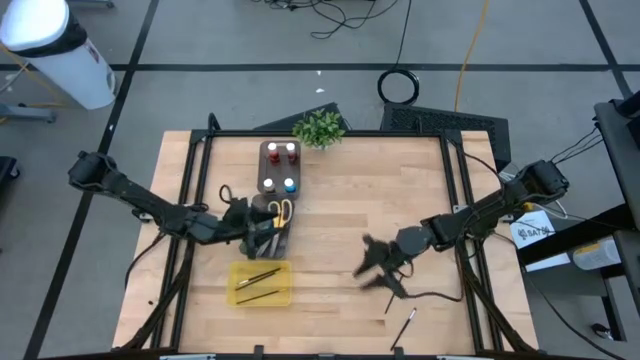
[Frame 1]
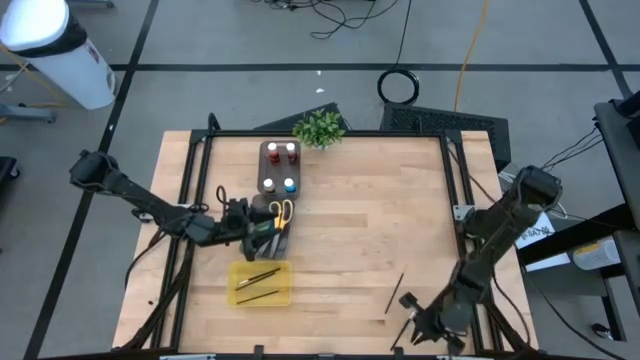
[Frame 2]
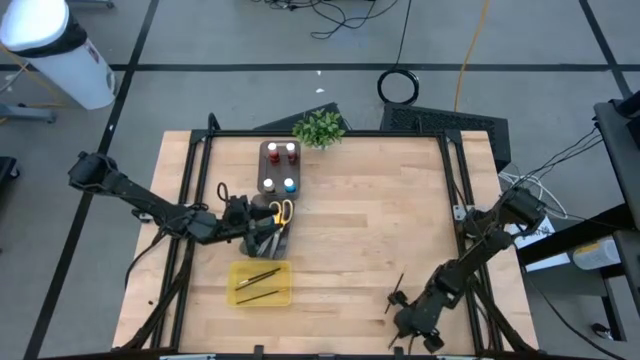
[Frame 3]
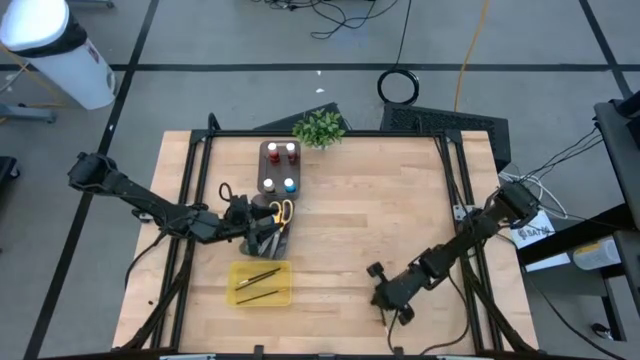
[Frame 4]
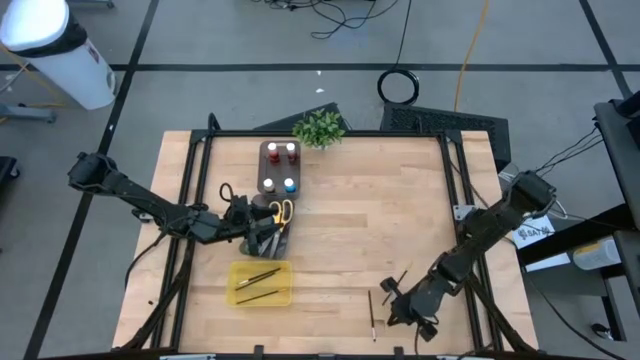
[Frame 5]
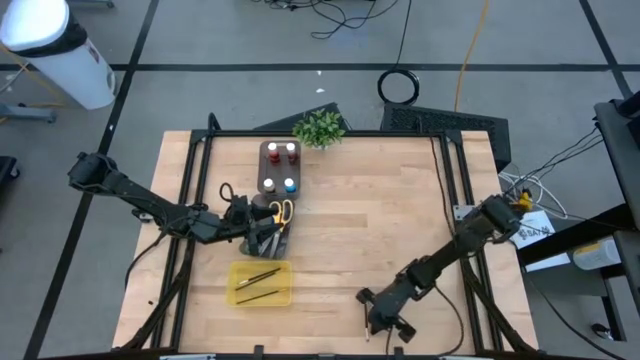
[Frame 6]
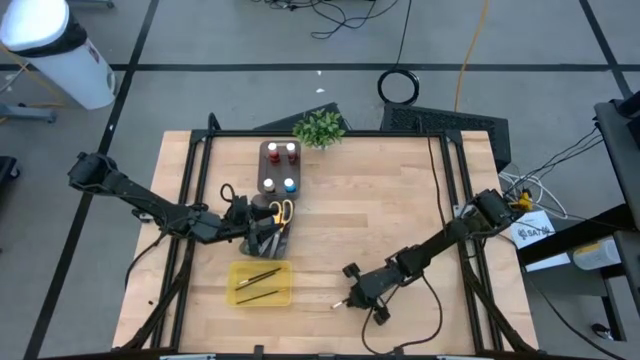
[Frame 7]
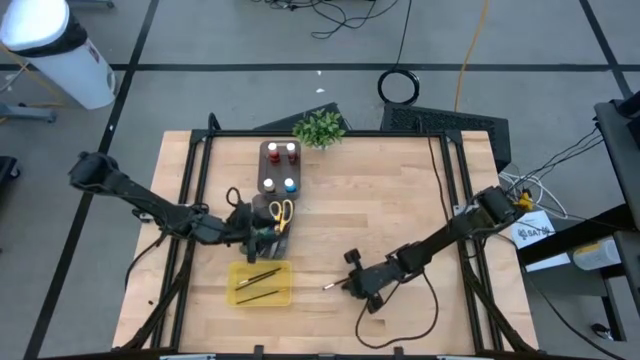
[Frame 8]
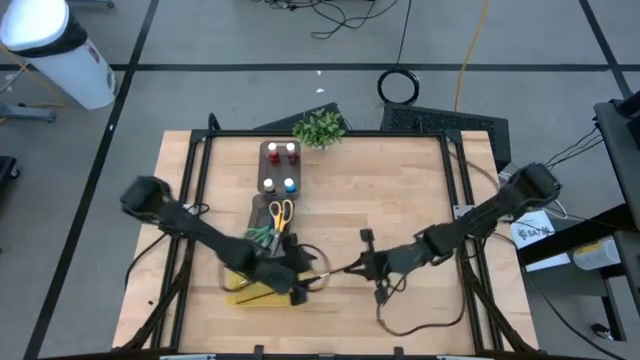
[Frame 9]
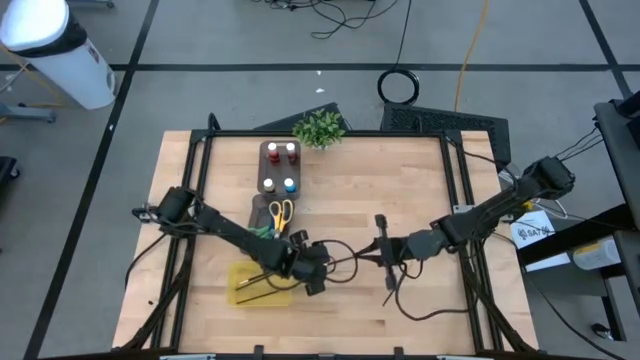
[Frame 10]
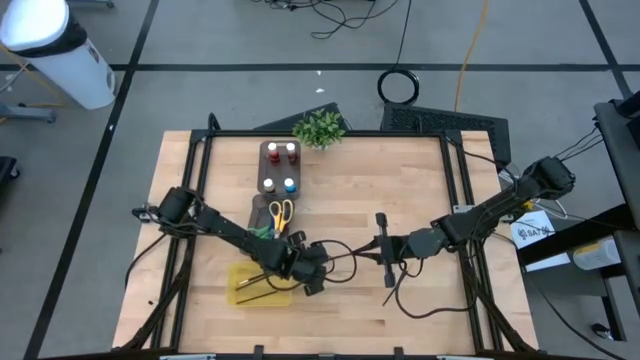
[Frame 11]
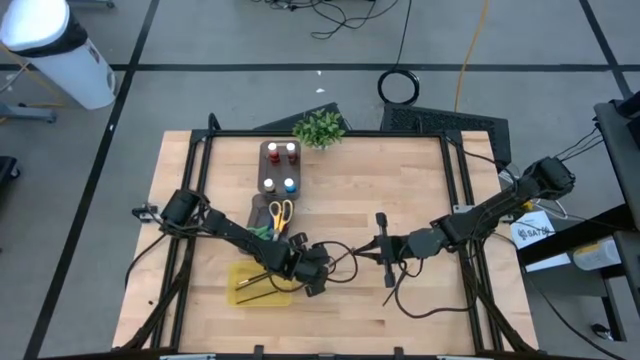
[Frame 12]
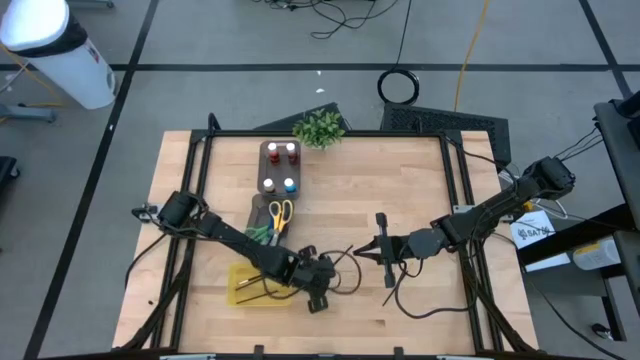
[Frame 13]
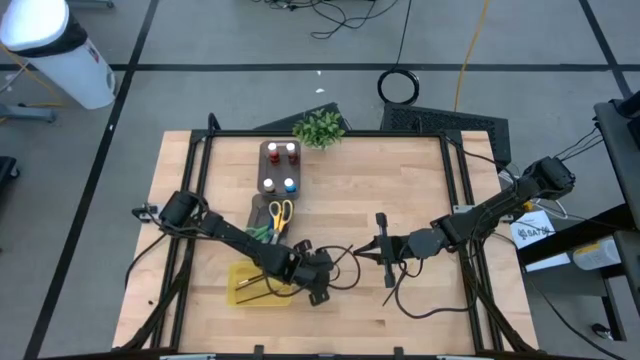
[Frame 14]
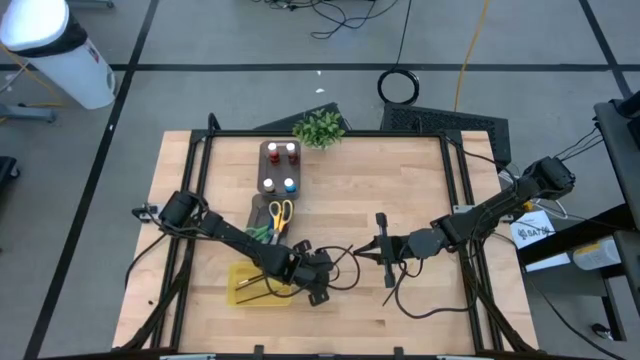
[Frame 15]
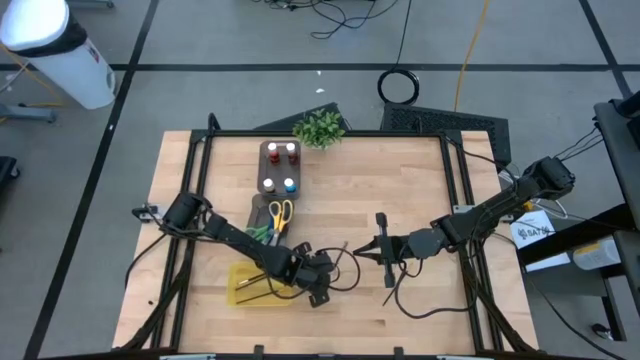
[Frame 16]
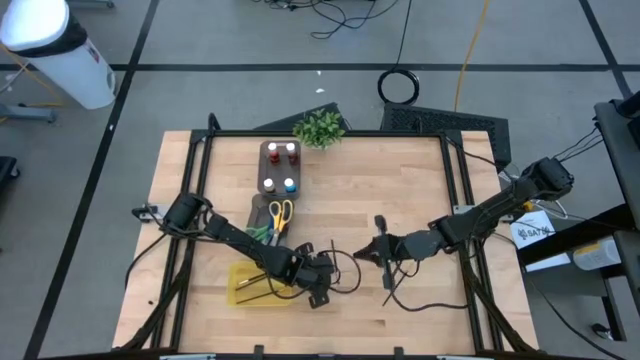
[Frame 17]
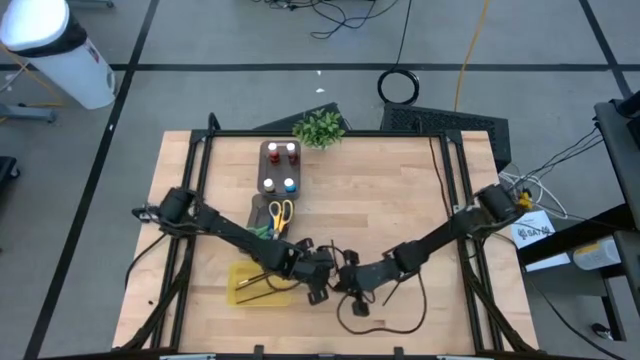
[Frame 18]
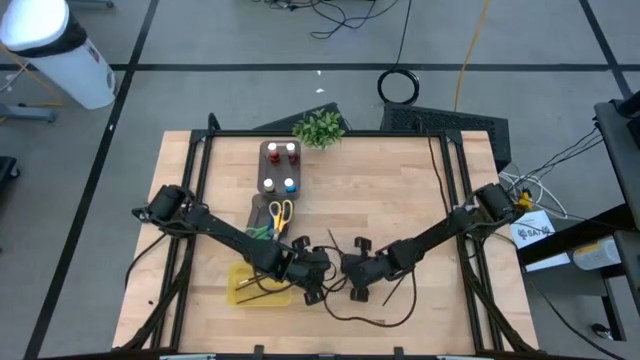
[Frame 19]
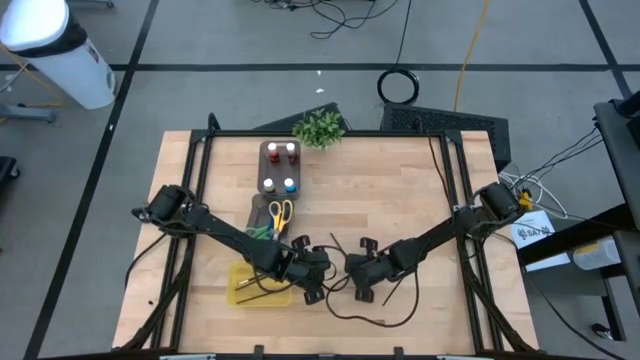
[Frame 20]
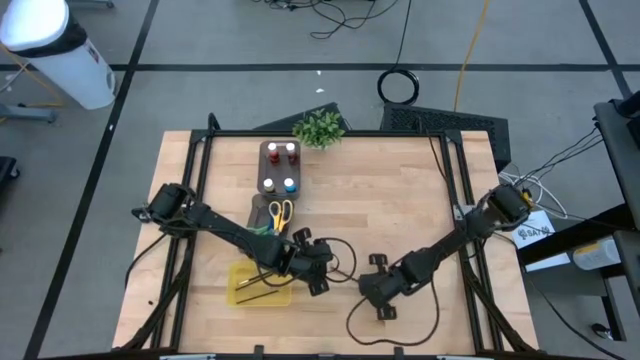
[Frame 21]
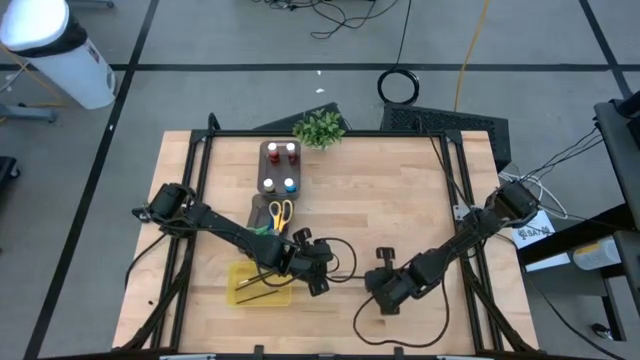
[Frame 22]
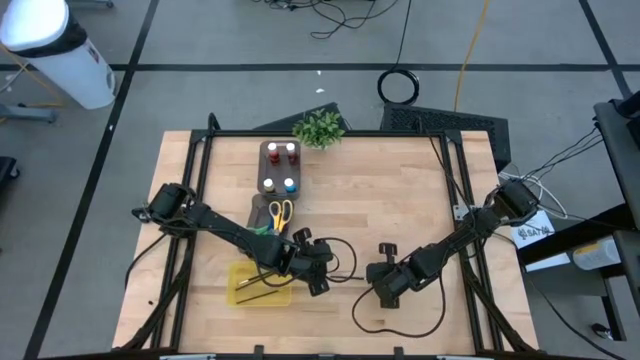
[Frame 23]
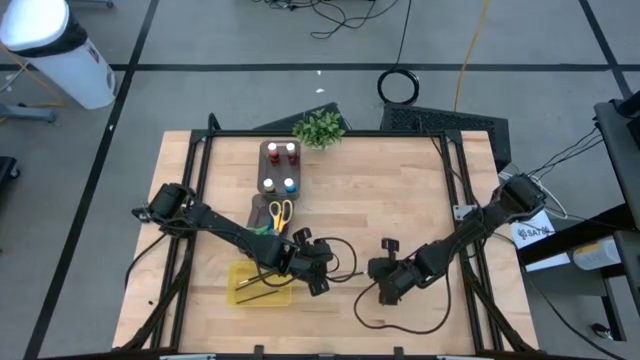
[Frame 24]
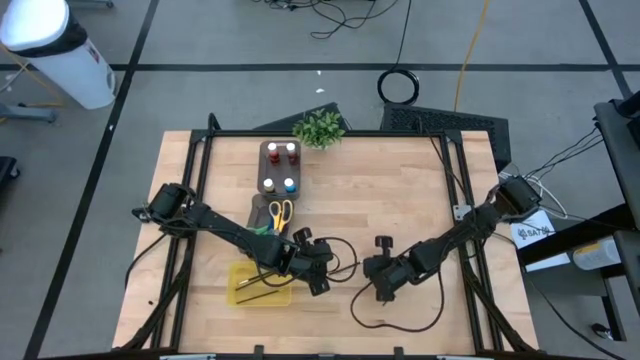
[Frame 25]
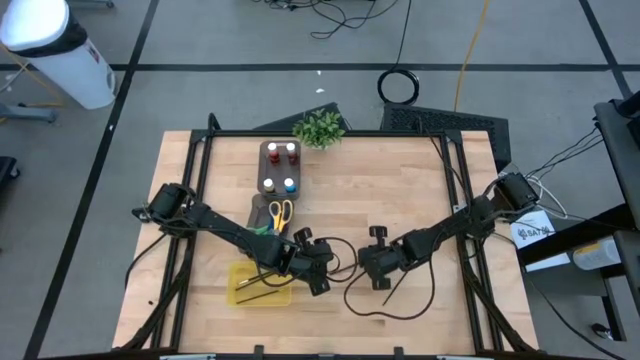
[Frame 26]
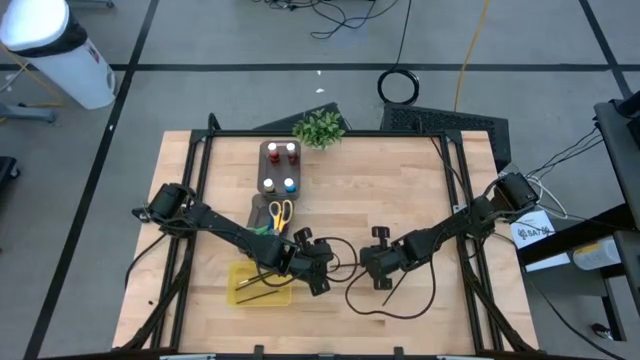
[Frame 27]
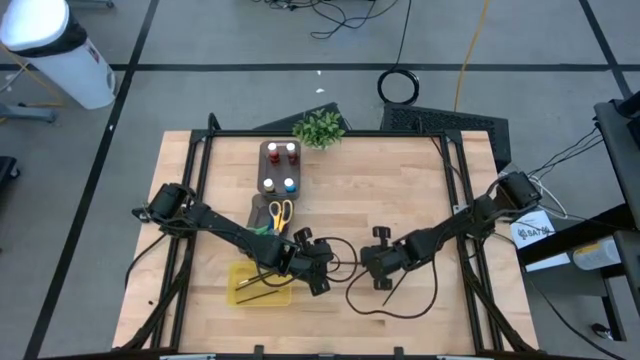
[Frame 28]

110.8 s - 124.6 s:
Task: Pick & Place Paint Supplies
Put the black paint brush into the yellow bin

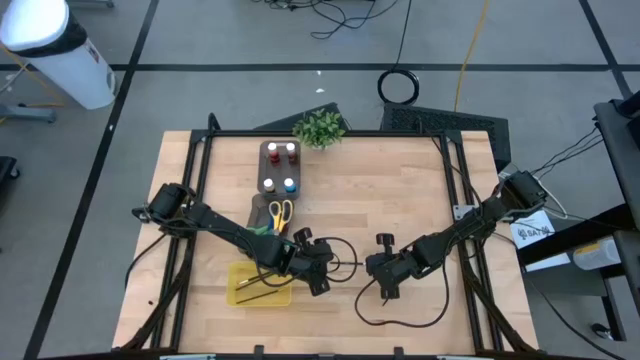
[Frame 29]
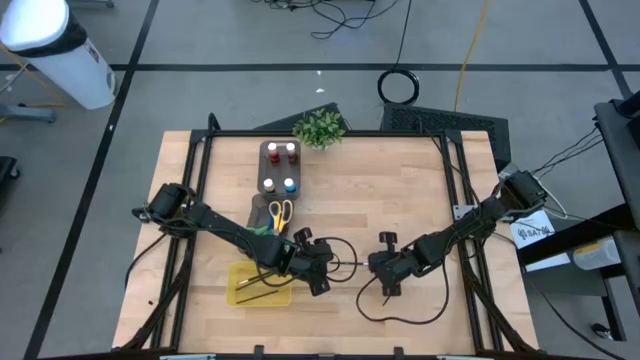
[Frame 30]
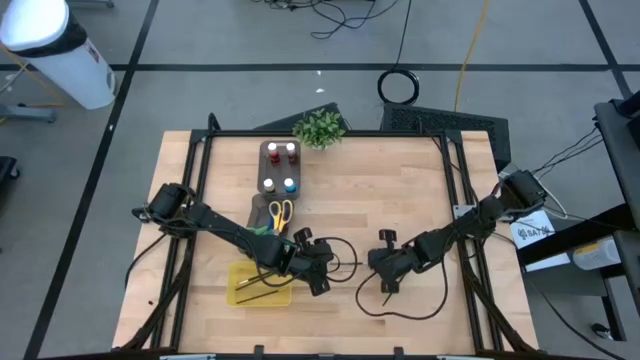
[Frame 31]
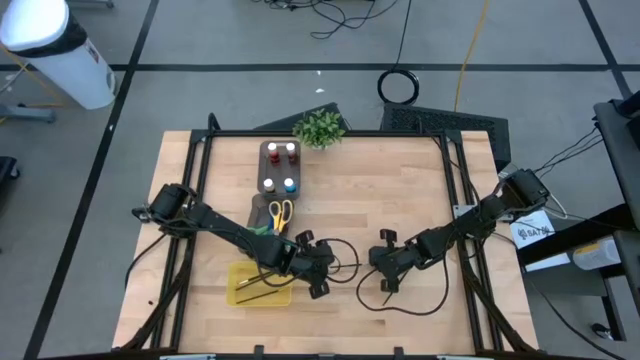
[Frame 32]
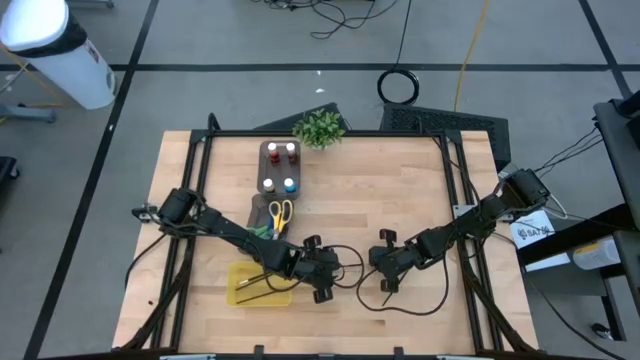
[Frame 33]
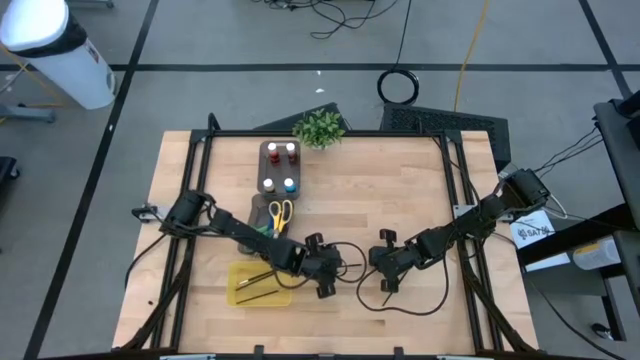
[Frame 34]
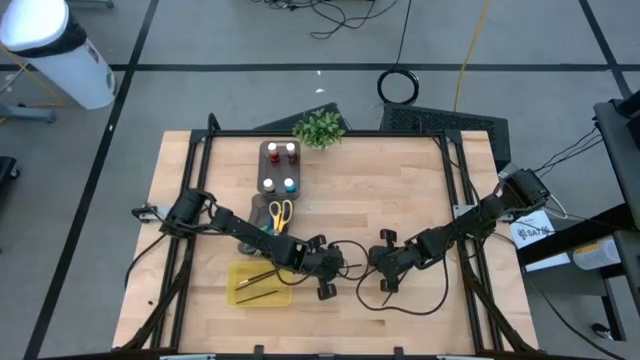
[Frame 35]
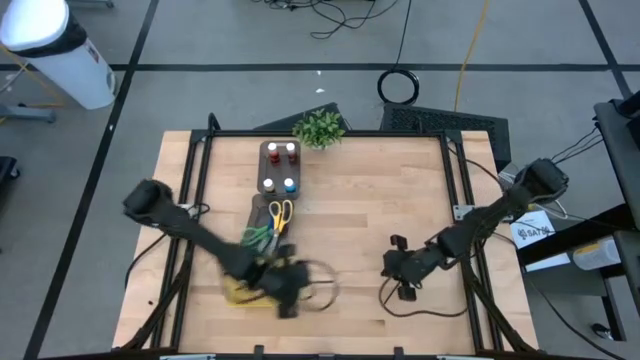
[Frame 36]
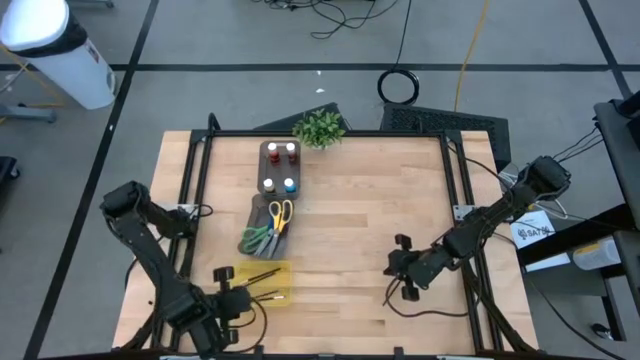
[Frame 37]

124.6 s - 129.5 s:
Put the black paint brush into the yellow bin

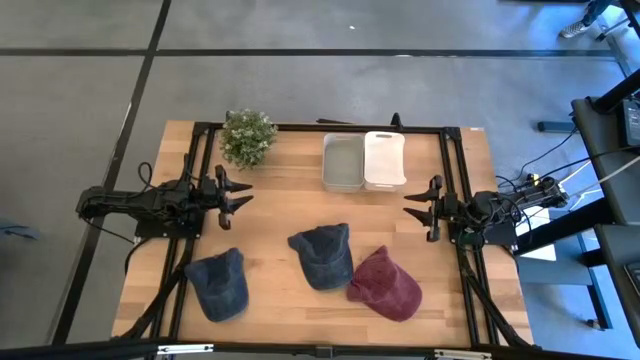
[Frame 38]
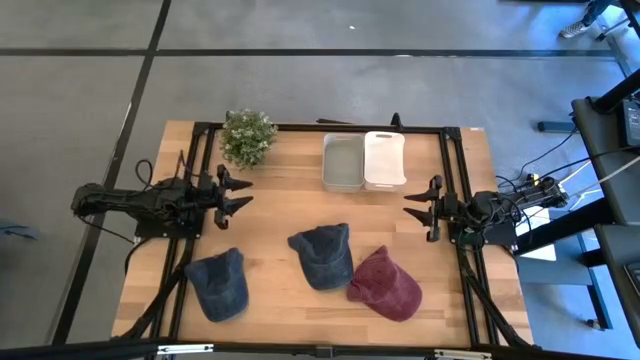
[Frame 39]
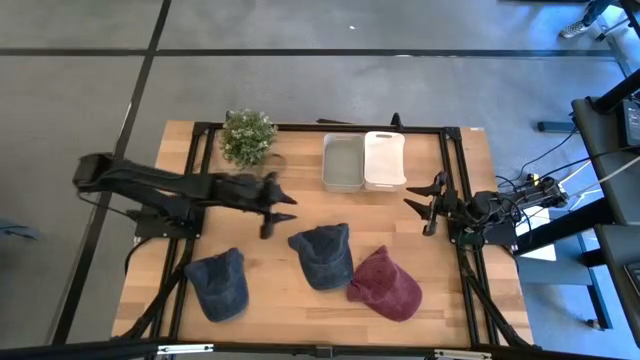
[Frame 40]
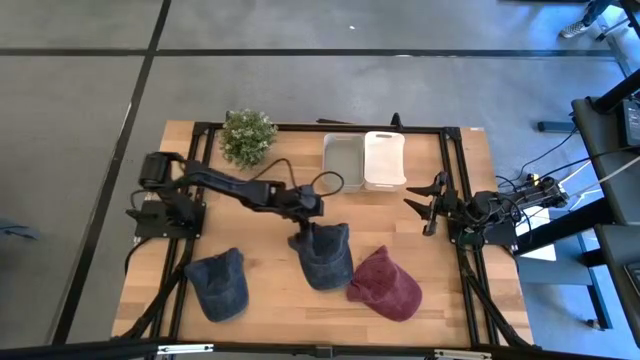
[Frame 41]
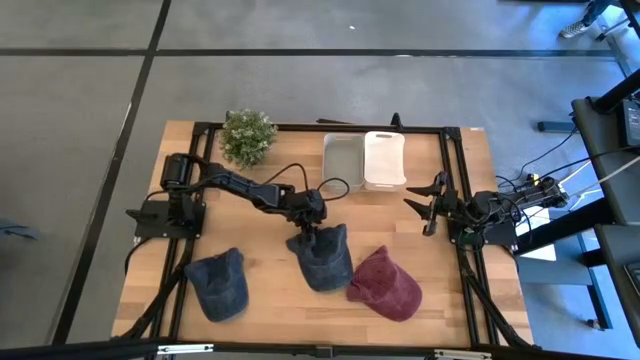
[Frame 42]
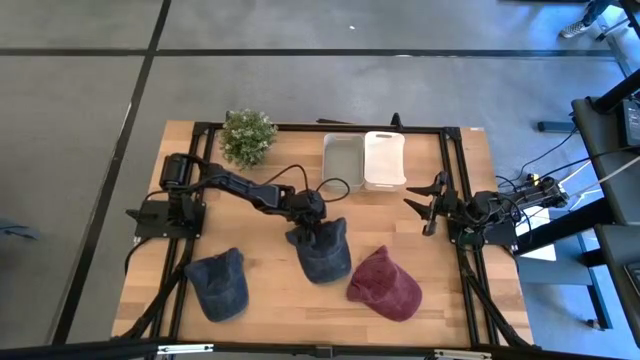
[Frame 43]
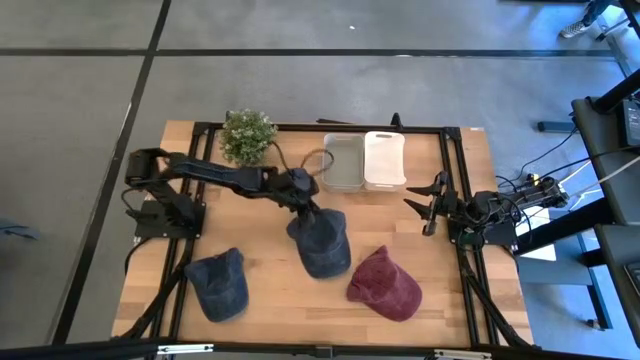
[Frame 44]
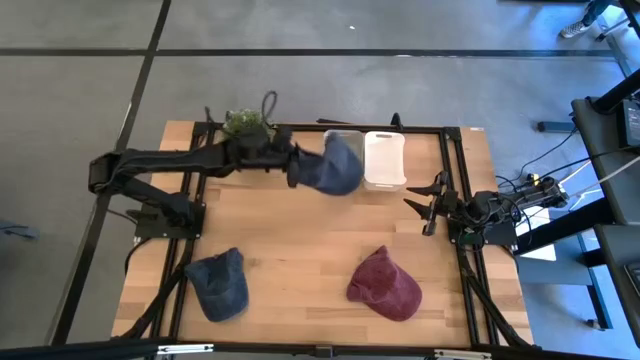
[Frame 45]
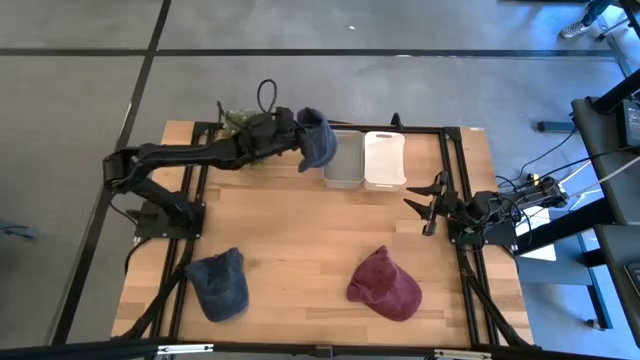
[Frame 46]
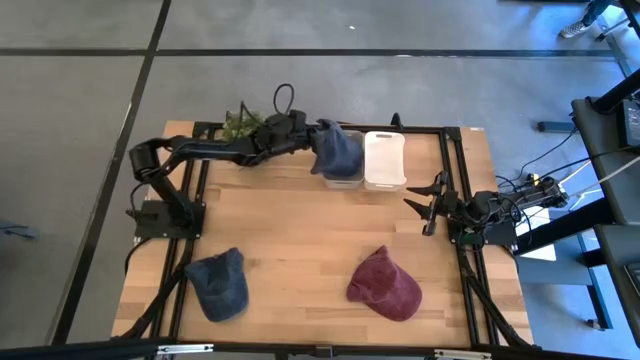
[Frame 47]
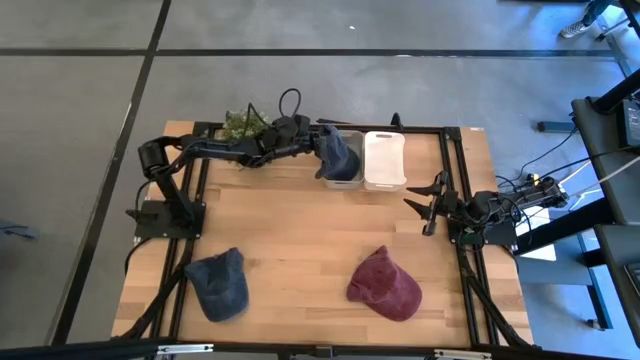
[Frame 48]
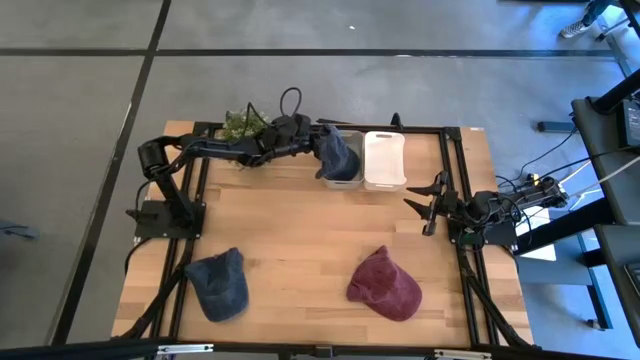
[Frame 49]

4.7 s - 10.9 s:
Task: Pick & Place hat
Put the right black cap into the gray bin
